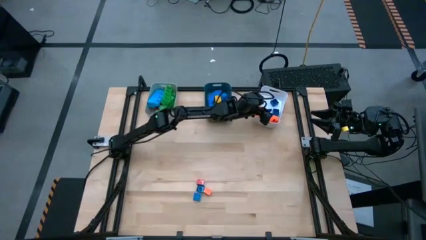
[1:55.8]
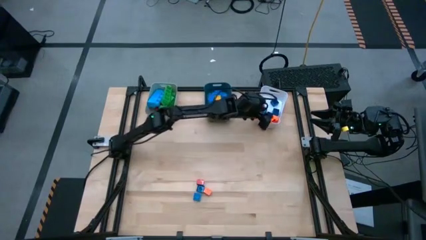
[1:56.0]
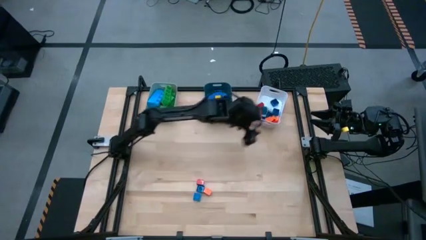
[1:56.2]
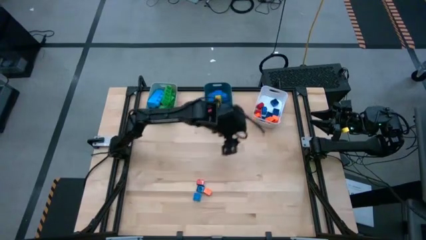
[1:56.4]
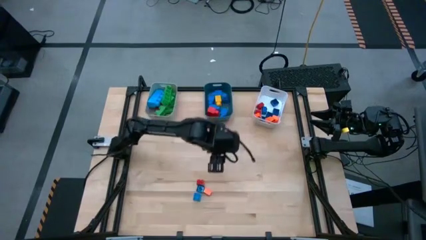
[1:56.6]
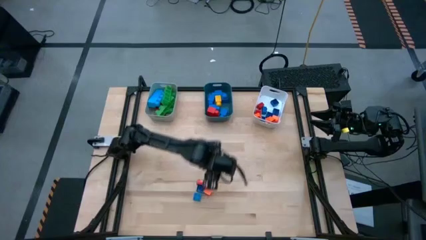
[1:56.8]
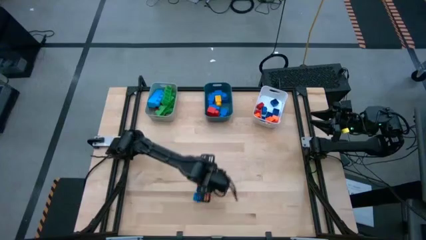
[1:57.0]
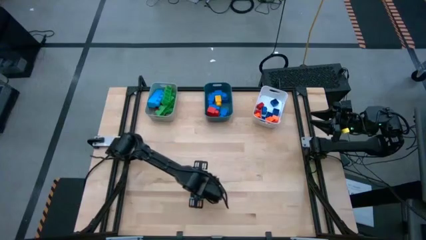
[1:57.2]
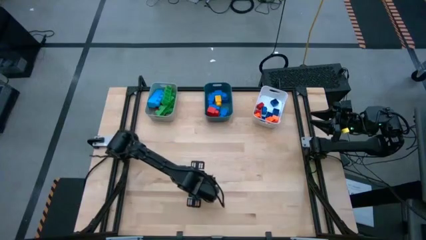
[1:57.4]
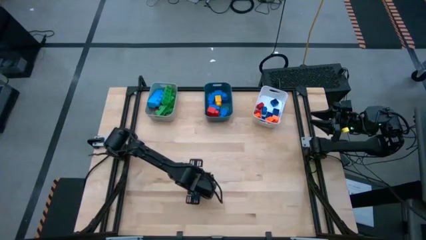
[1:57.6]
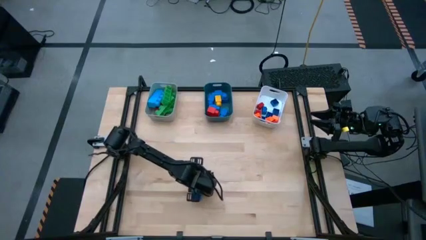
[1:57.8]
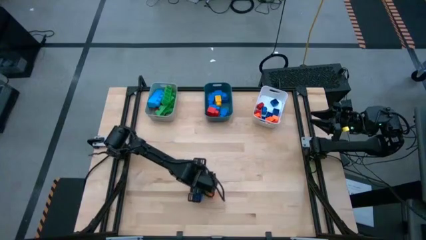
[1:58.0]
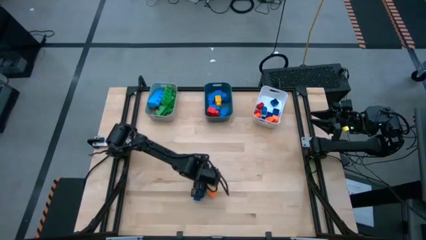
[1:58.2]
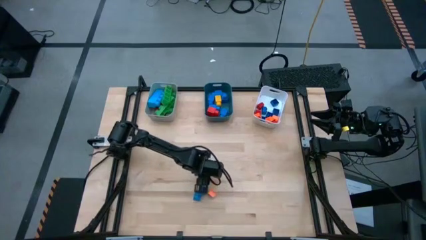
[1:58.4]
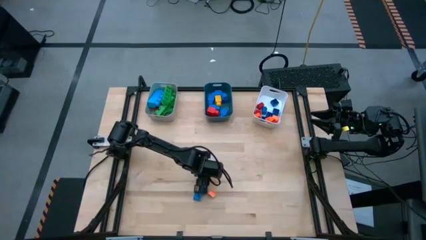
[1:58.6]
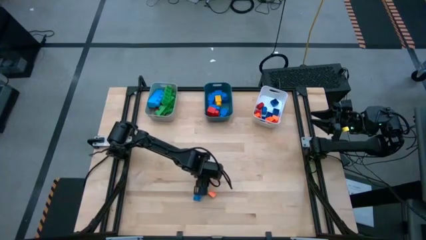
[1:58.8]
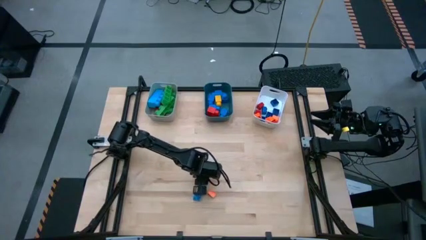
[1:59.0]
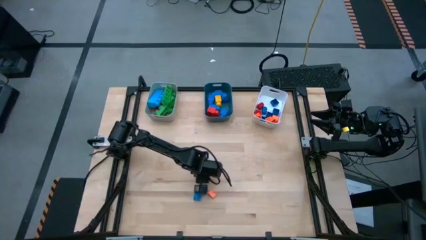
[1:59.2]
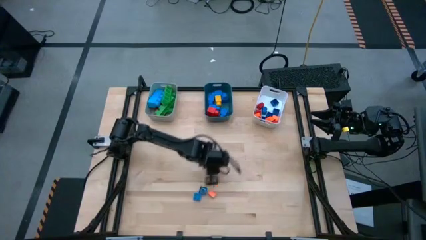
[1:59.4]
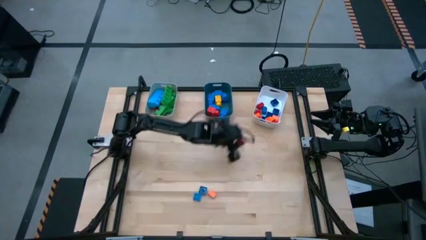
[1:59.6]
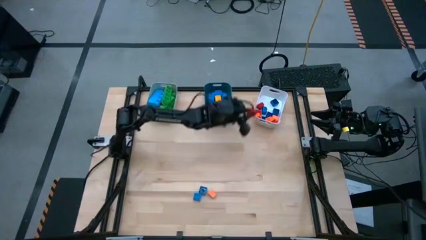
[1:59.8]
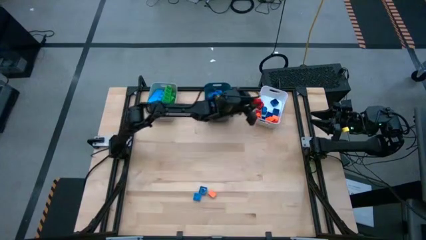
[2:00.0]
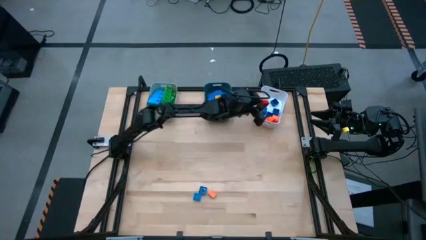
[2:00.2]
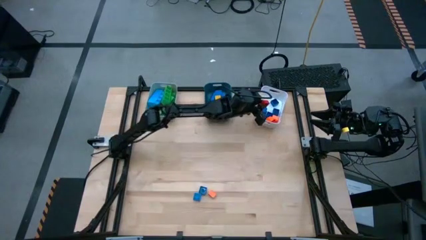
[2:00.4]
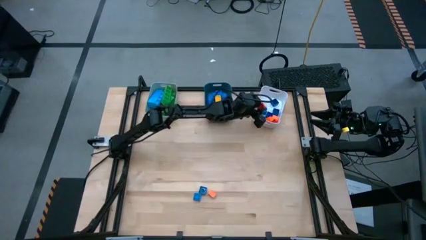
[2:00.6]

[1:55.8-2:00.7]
Task: Sort blocks by size
Put the small red 4 stud game piece into the white bin

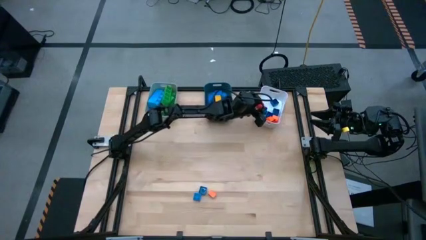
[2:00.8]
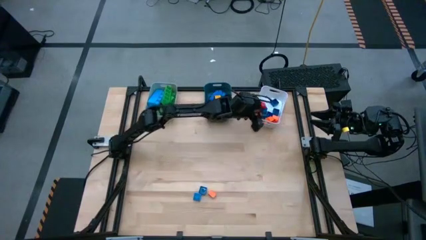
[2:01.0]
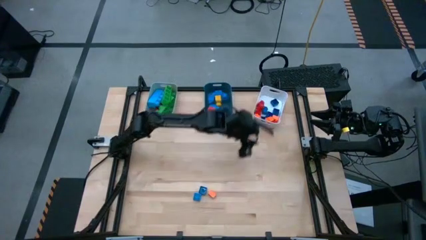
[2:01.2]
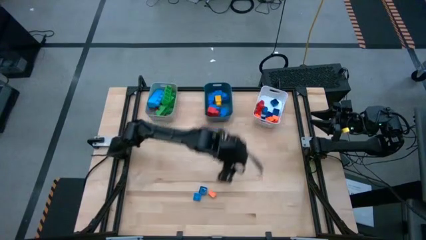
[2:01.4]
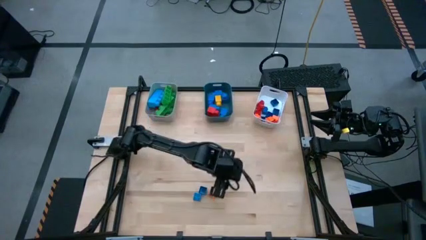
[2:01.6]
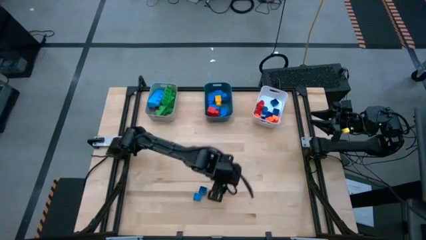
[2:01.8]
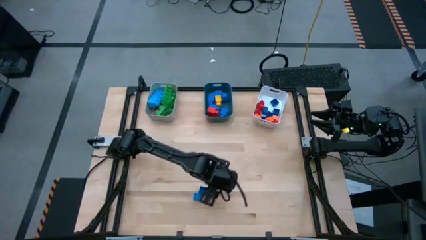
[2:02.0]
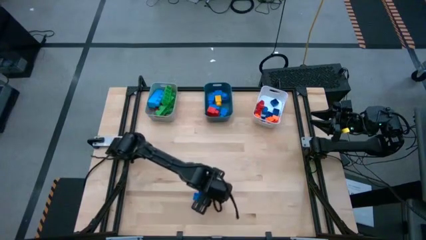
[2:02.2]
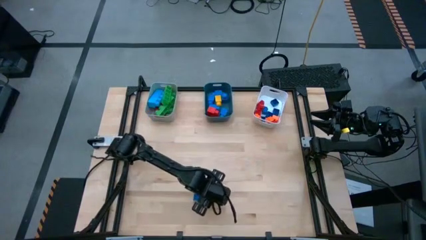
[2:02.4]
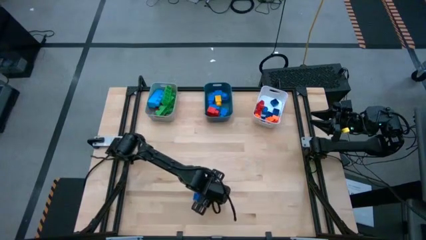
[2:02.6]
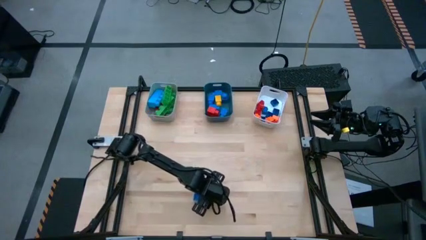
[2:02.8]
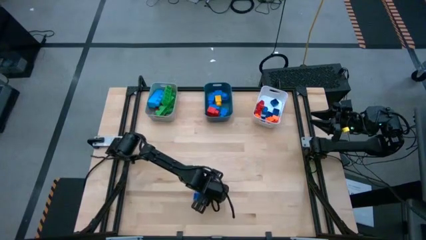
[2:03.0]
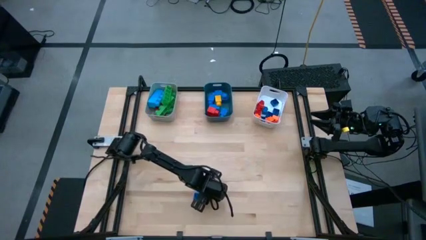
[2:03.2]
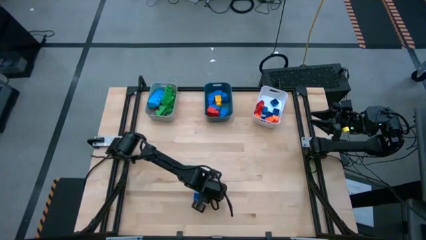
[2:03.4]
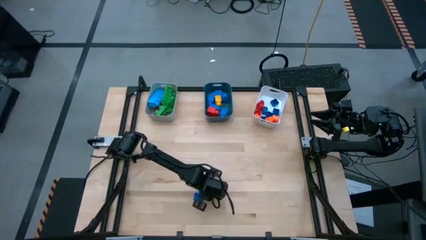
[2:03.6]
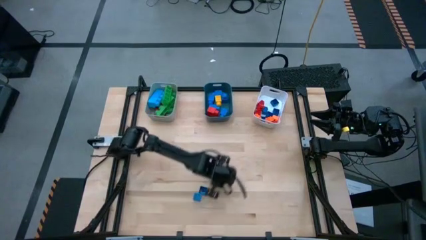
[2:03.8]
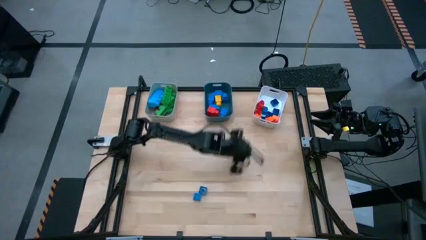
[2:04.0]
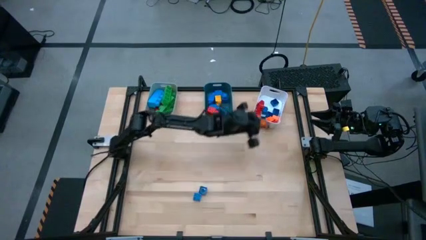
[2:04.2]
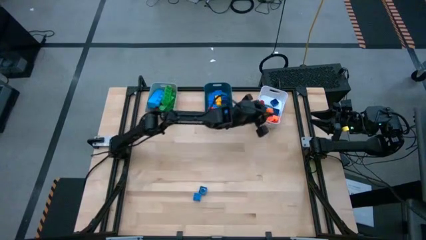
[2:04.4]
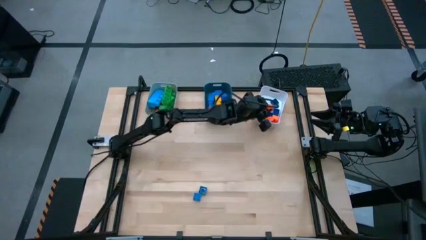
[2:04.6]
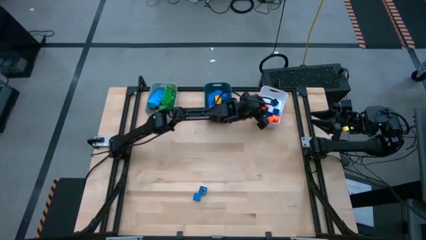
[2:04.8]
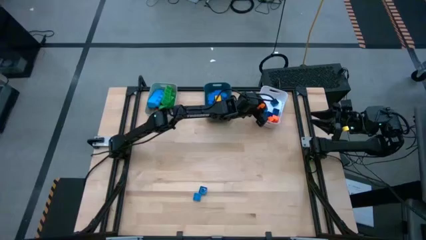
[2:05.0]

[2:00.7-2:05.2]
Put the small orange 4 stud game piece into the white bin

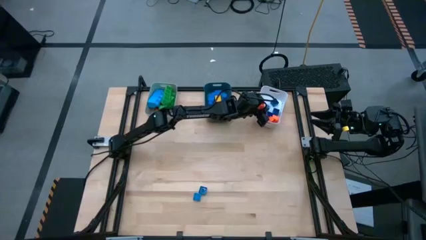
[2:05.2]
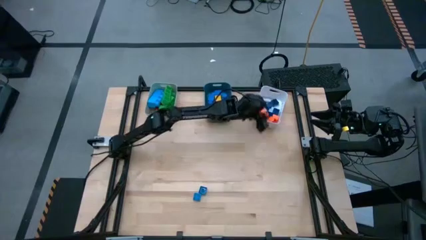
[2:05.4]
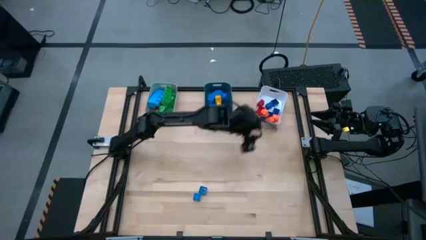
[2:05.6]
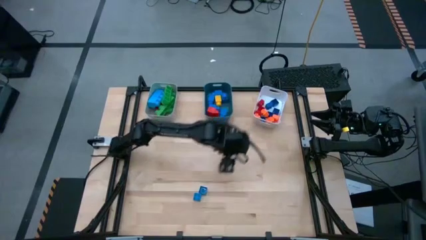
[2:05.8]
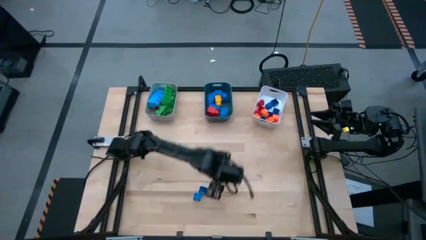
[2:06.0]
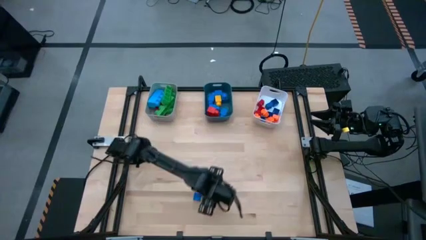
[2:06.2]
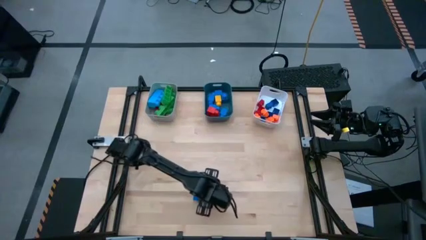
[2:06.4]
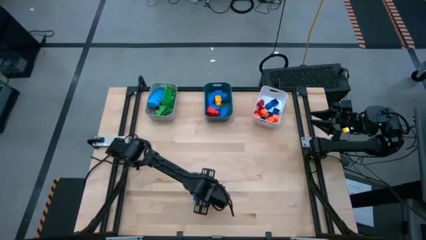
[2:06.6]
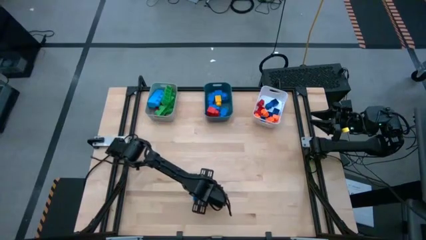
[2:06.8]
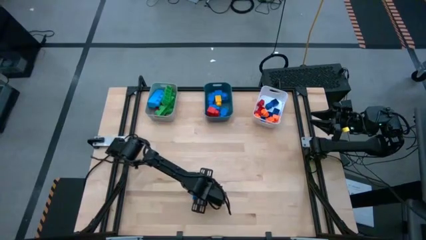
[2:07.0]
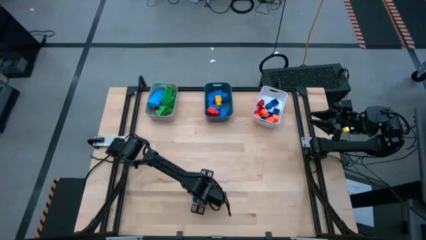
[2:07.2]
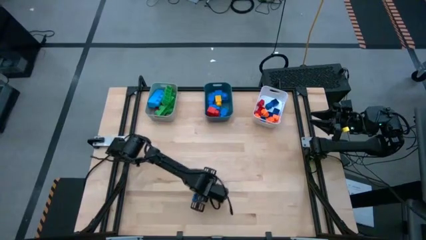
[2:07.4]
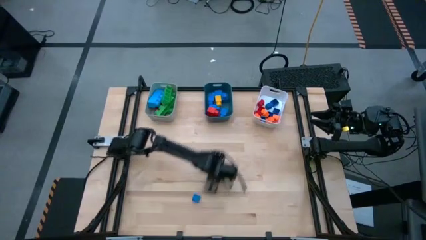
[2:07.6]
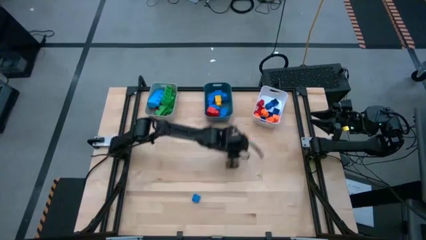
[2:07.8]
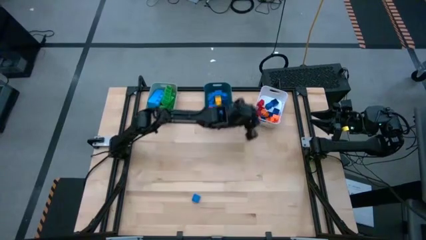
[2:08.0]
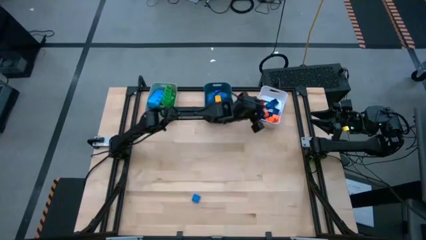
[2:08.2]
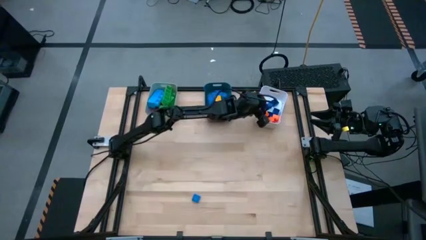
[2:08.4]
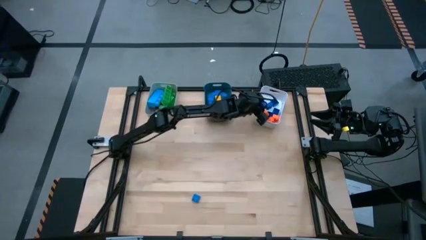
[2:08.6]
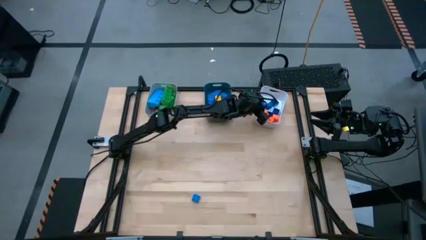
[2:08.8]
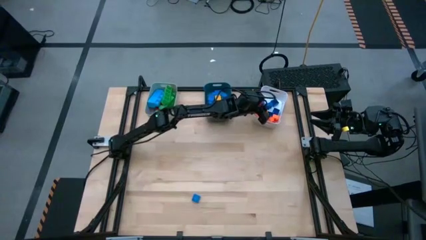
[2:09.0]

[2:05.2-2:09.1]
Put the small blue 4 stud game piece into the white bin

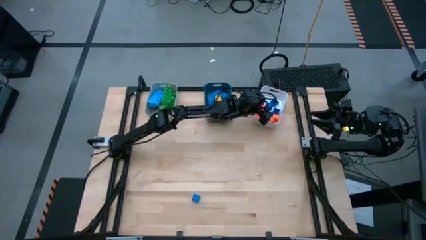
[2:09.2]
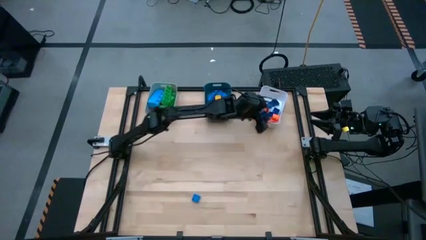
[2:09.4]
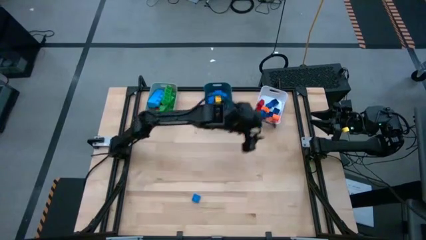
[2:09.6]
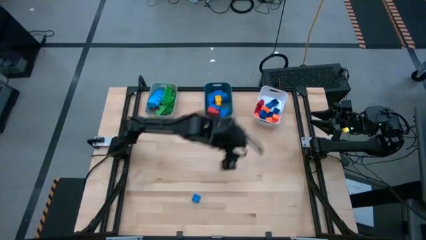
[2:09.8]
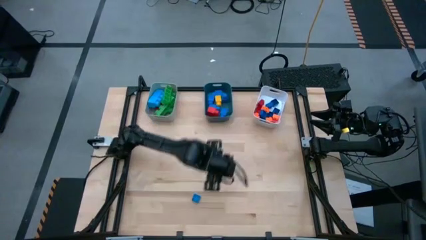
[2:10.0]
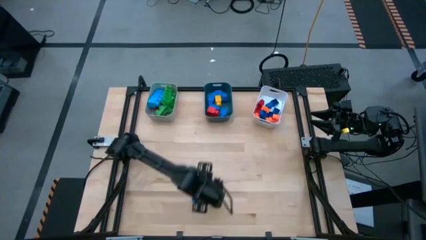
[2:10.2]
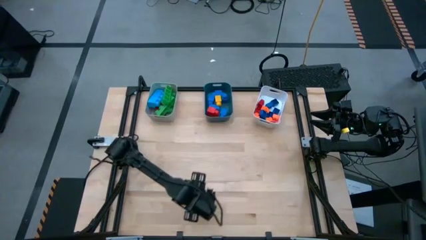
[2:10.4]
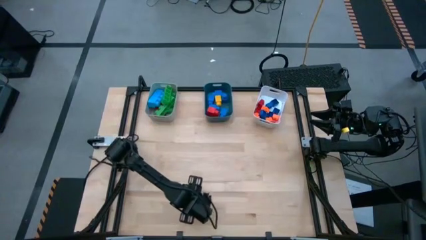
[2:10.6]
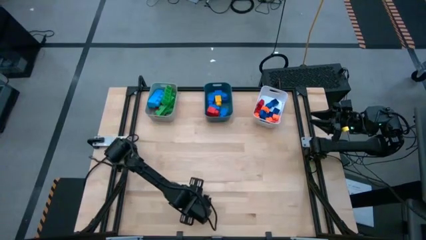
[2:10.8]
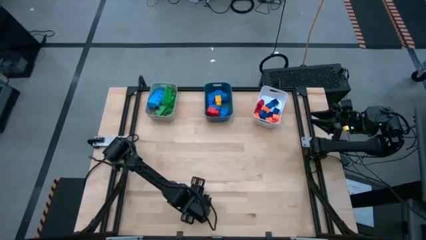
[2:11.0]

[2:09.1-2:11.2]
Put the small blue 4 stud game piece into the white bin

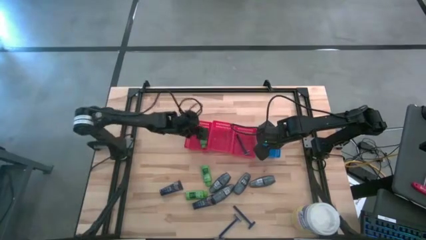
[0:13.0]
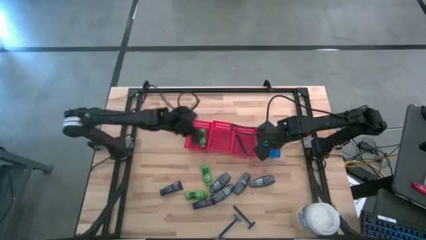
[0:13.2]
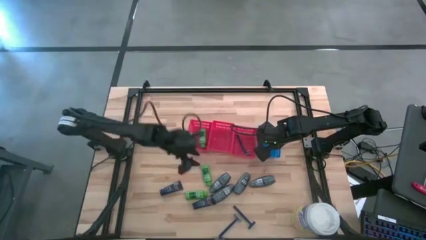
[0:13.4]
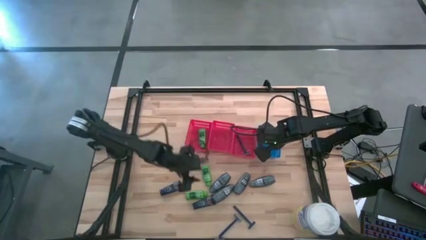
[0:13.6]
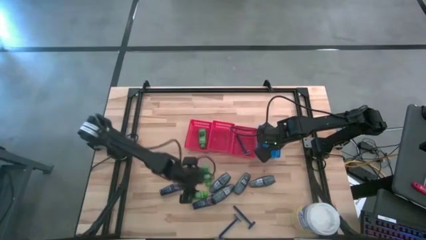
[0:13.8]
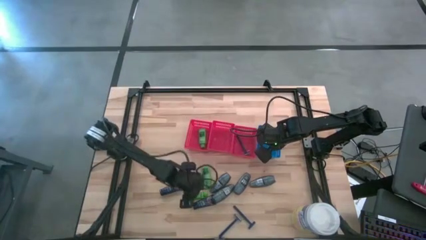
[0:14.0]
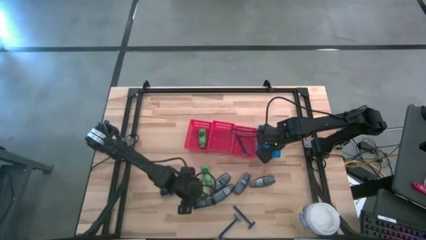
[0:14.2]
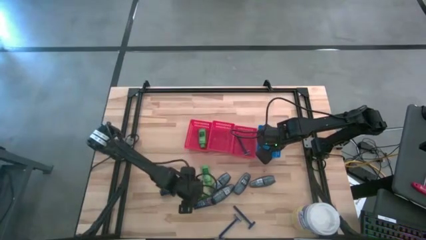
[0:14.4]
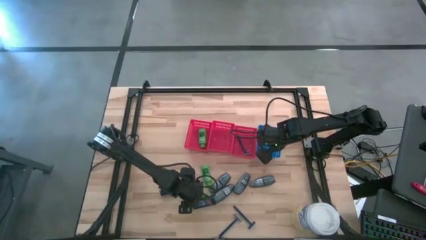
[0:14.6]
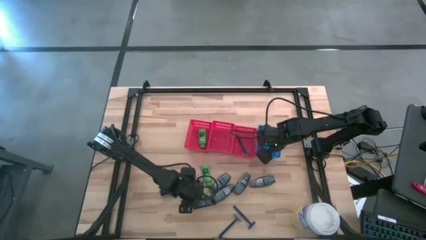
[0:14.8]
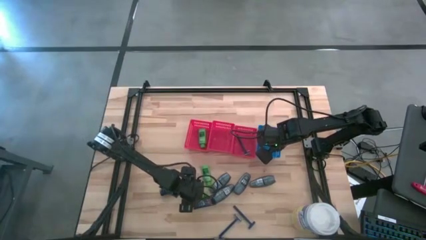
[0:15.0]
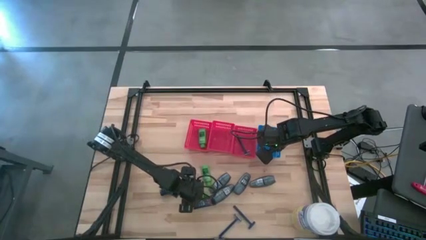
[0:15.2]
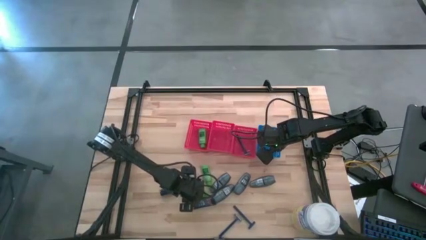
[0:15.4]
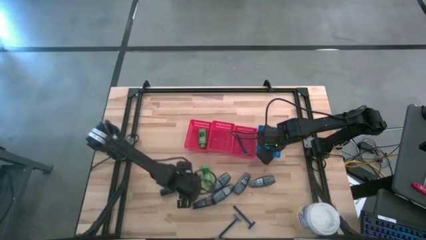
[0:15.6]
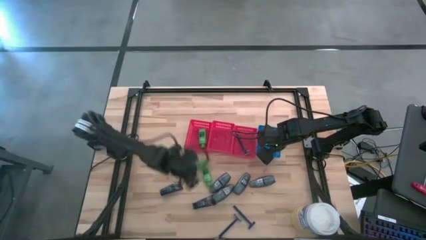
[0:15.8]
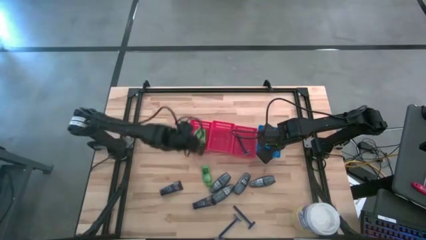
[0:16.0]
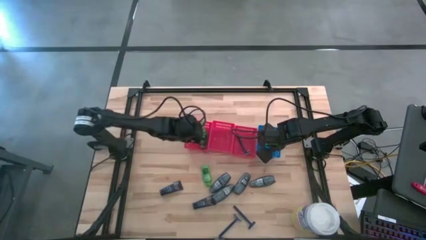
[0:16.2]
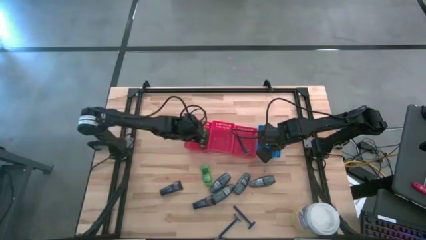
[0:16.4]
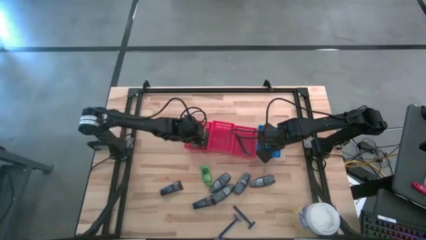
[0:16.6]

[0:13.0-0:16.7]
Task: Pick & Place Travel size toiletries
Put the green shampoo in the left red bin
